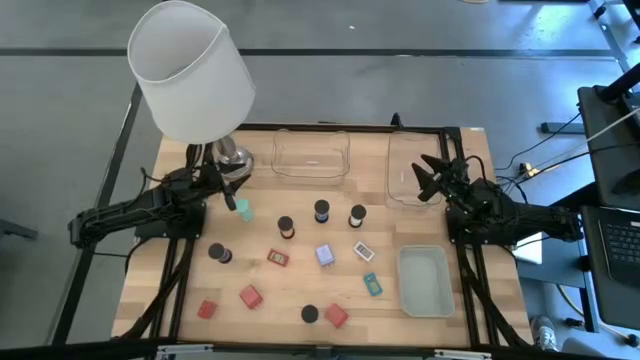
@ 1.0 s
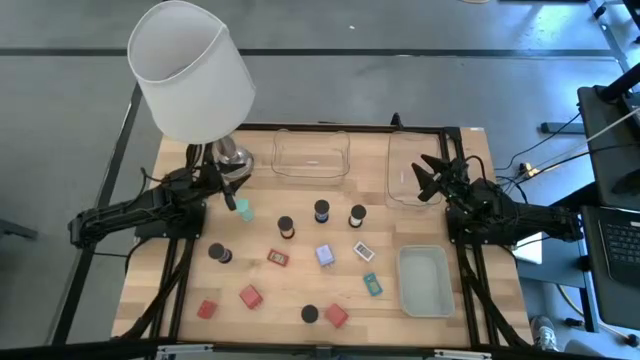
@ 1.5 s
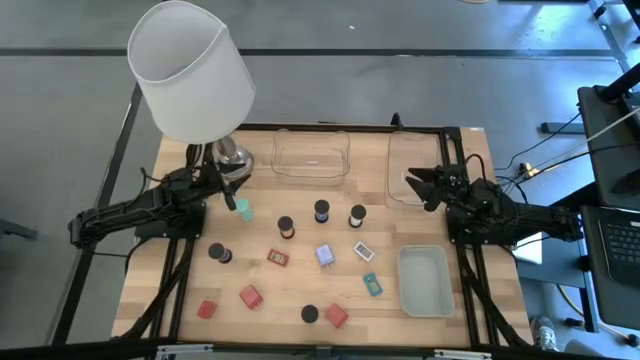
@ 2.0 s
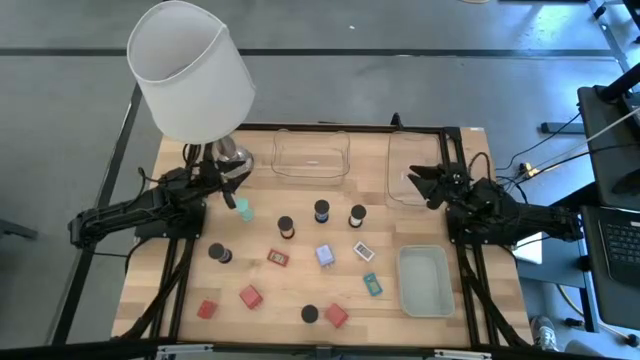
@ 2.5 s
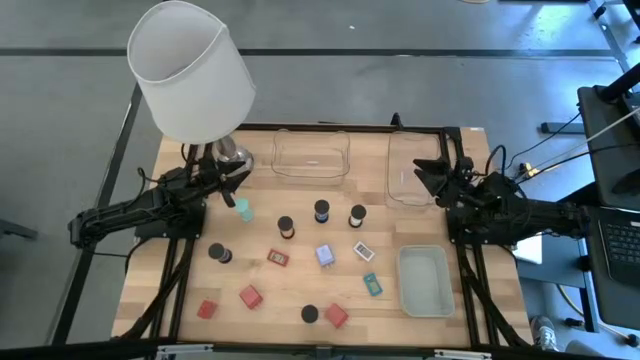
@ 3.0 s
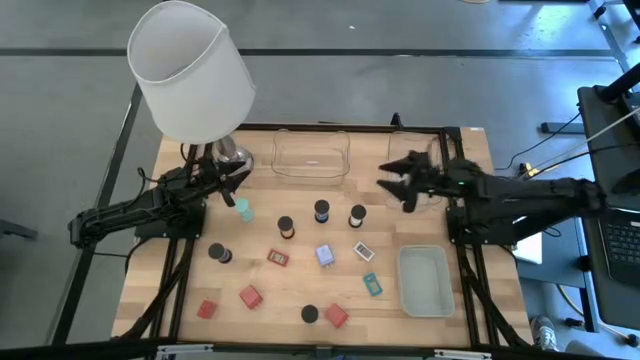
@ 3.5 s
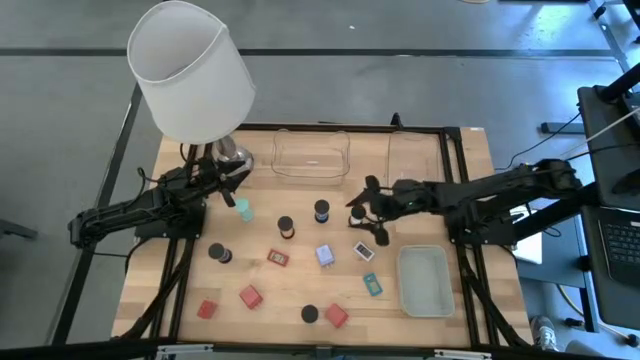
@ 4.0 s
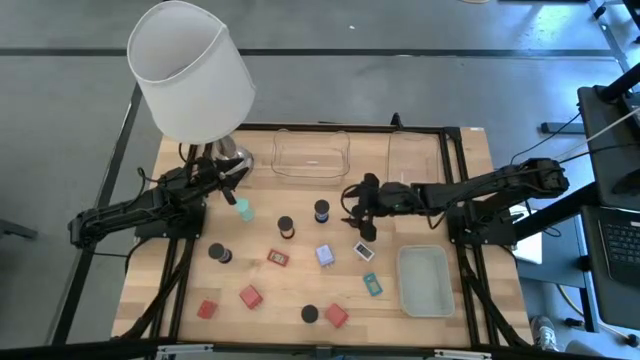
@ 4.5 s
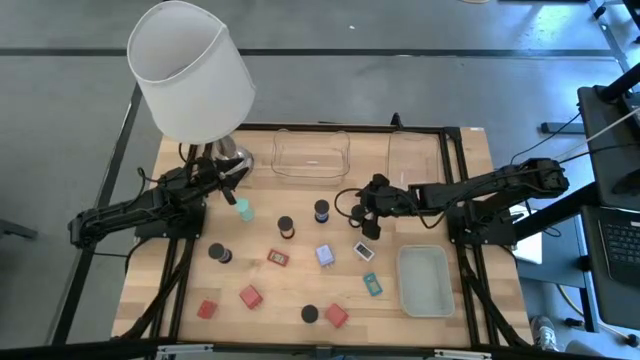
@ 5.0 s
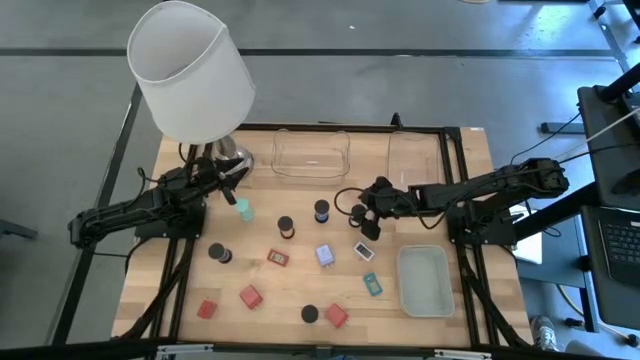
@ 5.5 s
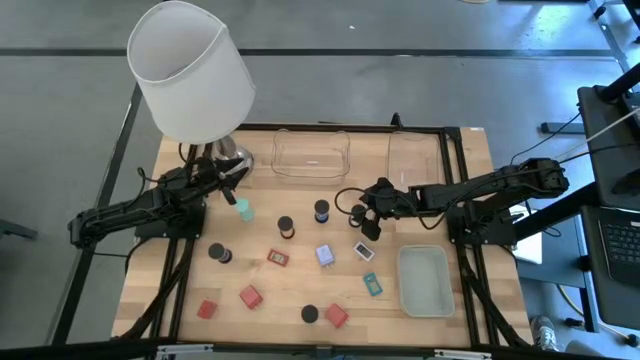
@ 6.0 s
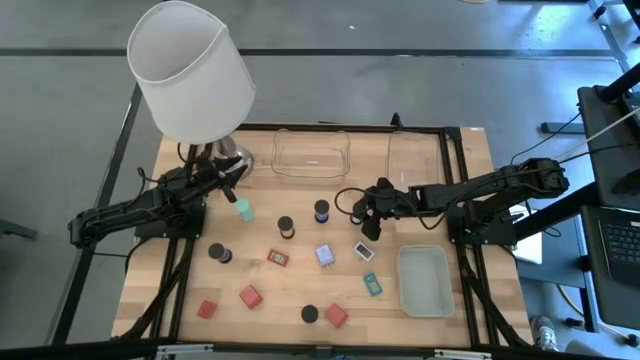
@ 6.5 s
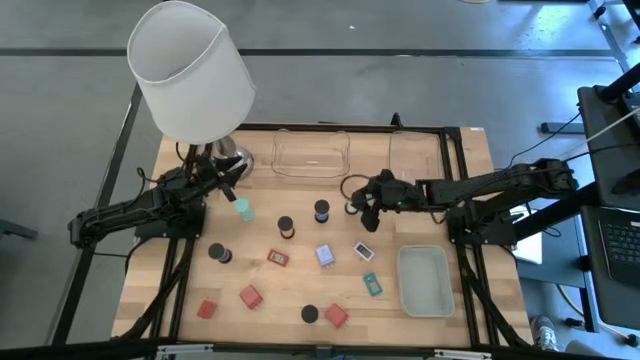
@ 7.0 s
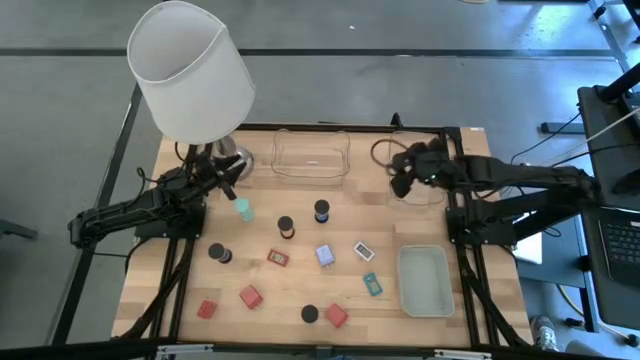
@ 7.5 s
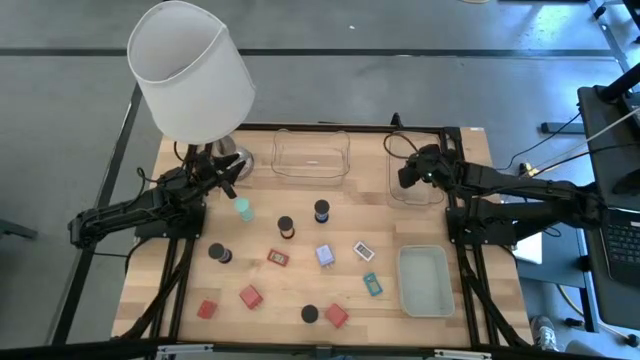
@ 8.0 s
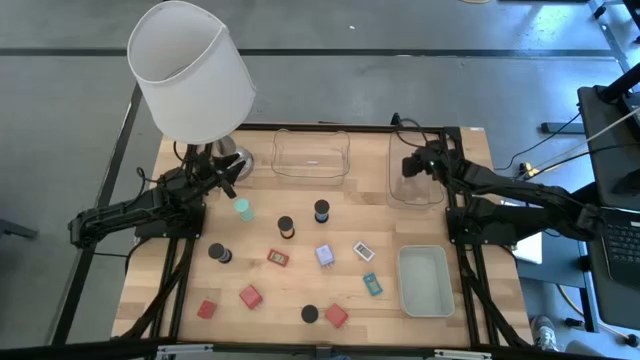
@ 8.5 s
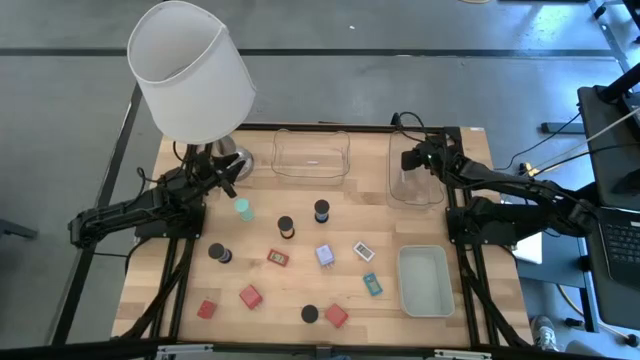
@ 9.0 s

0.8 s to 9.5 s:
Task: Pick & Place Office items
Put the white hourglass into the right transparent bin

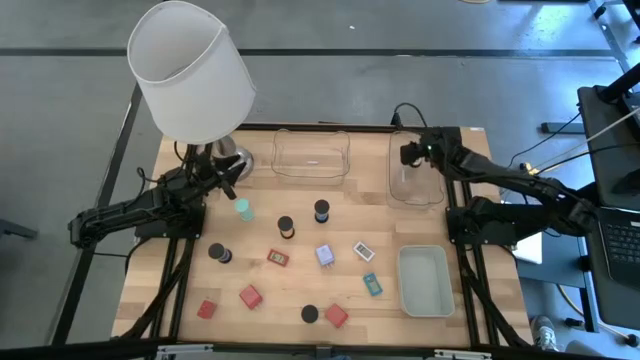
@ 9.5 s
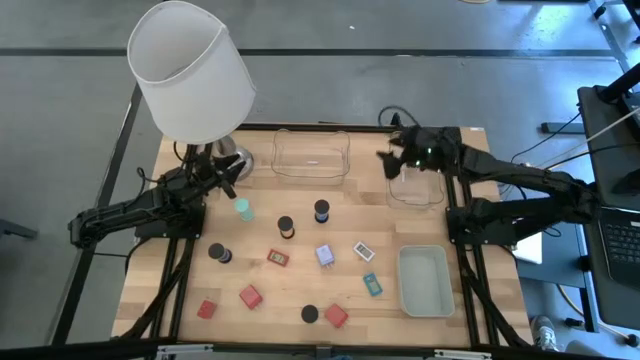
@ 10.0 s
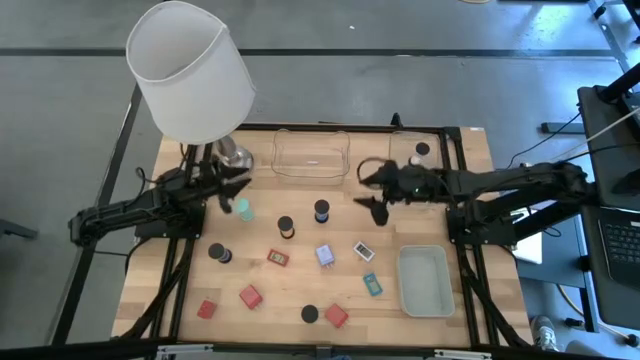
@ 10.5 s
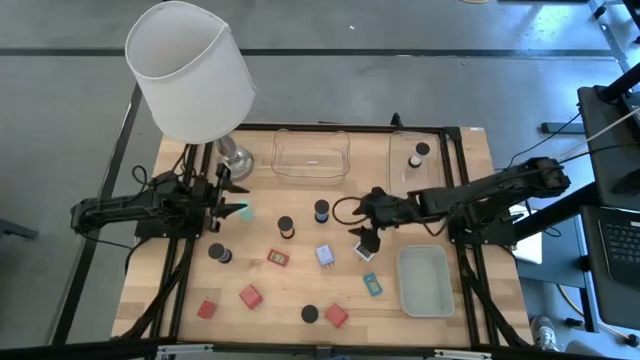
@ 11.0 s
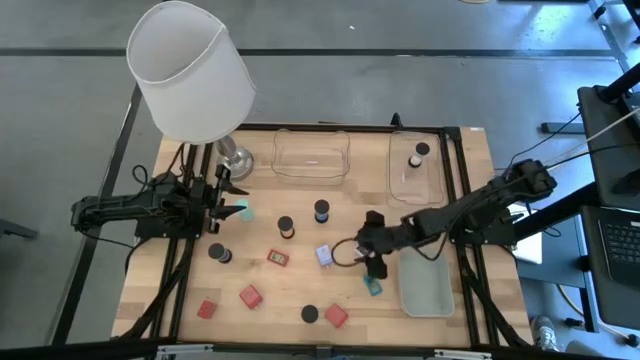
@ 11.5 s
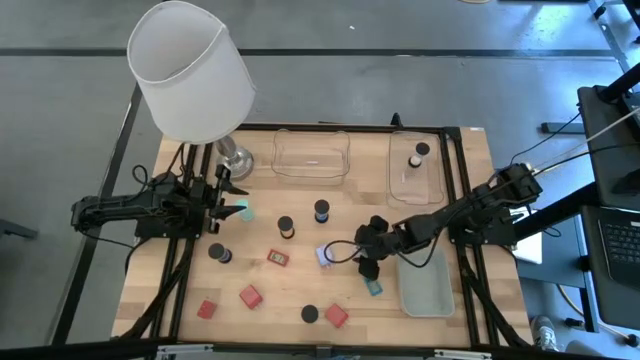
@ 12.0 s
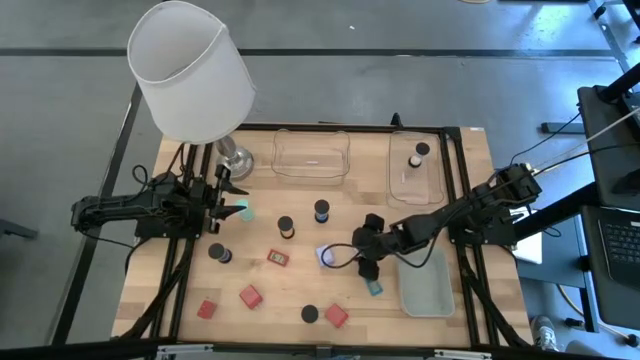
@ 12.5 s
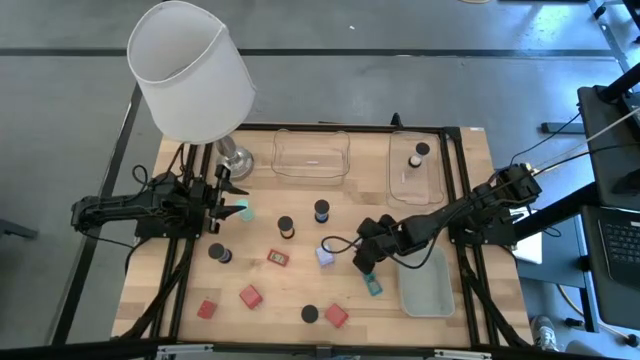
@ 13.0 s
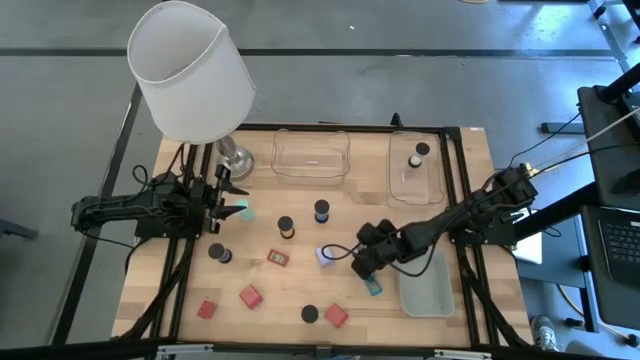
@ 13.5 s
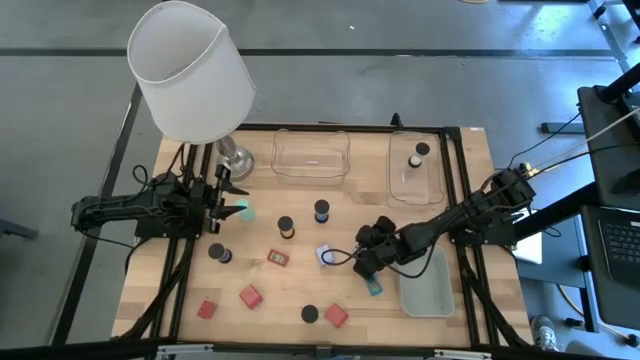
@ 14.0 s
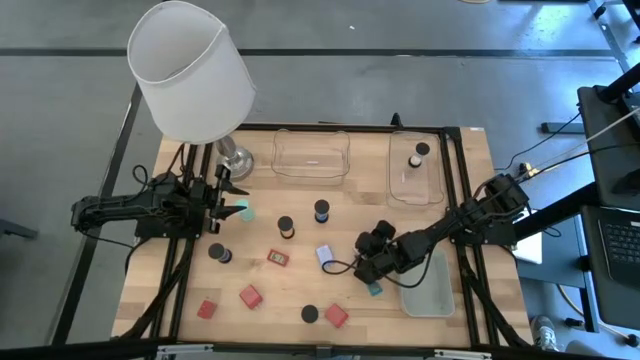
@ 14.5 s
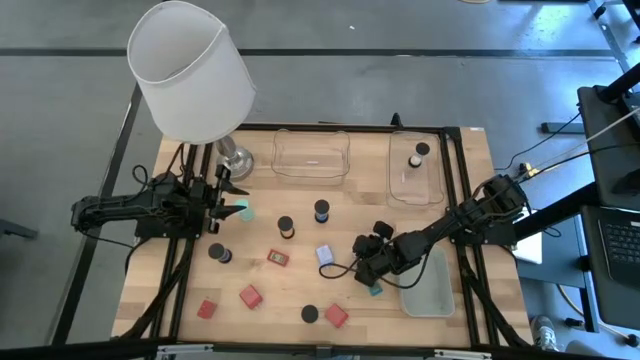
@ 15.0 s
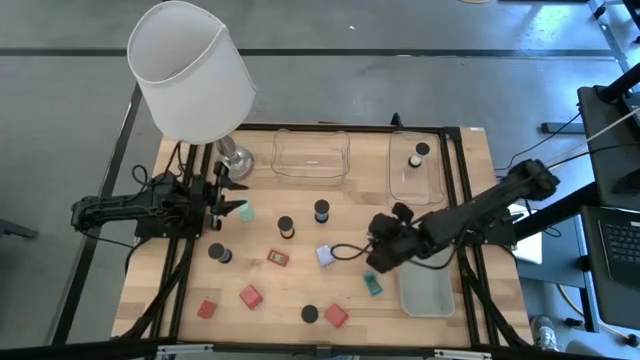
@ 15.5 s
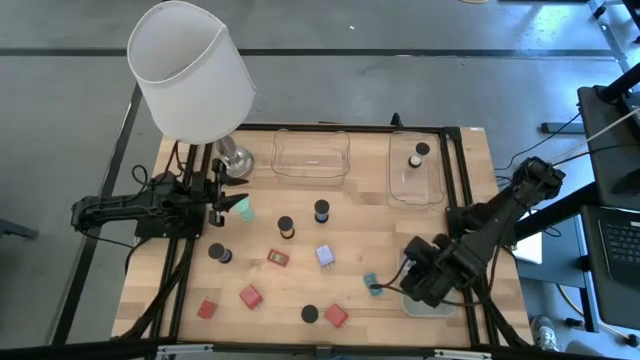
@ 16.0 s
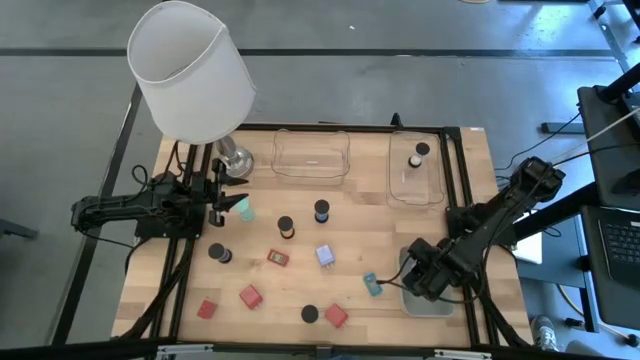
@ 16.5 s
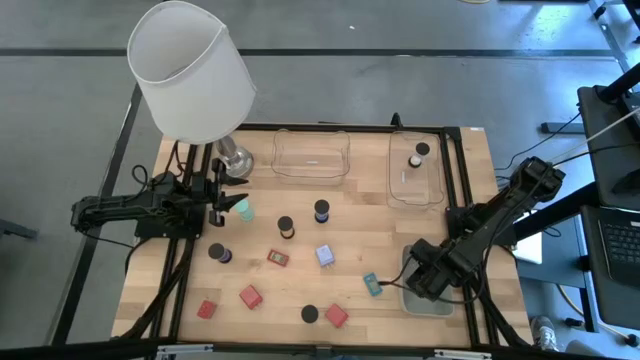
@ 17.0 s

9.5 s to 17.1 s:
Put the white digital clock into the gray bin

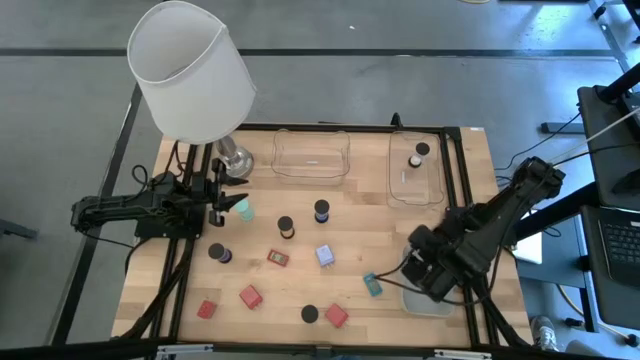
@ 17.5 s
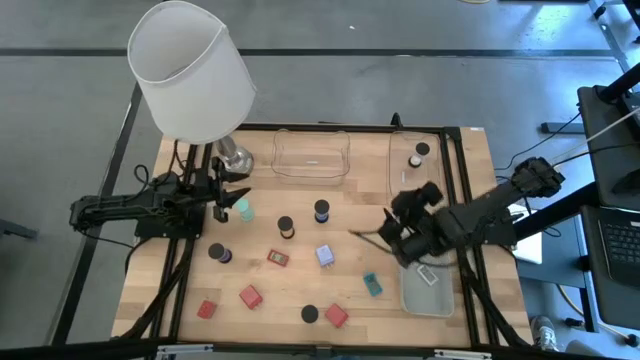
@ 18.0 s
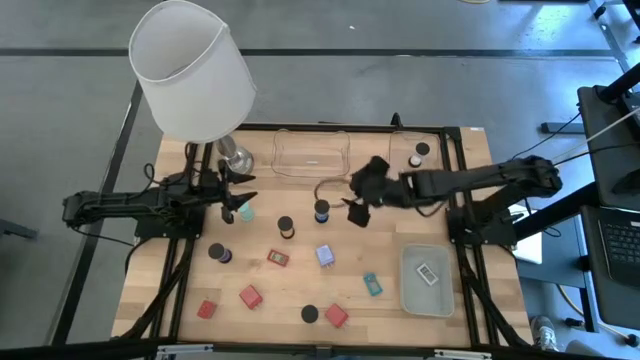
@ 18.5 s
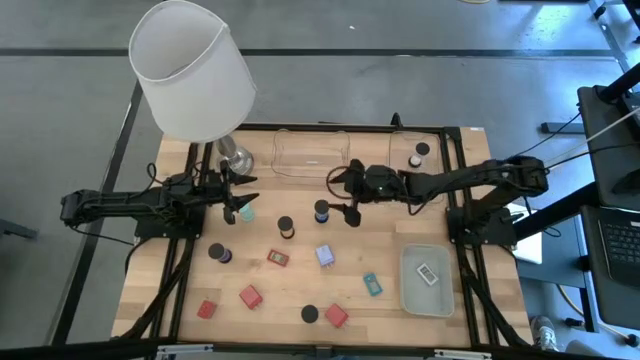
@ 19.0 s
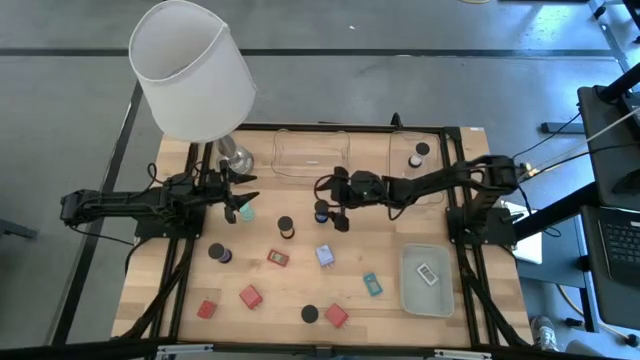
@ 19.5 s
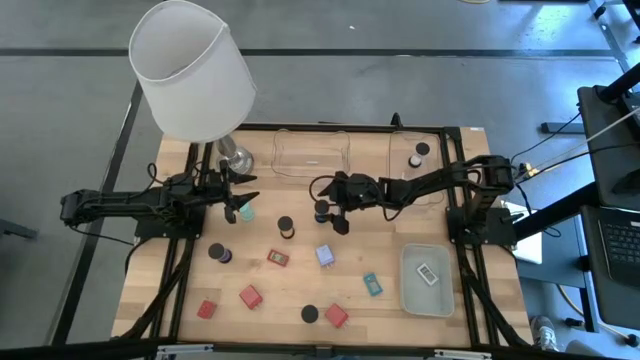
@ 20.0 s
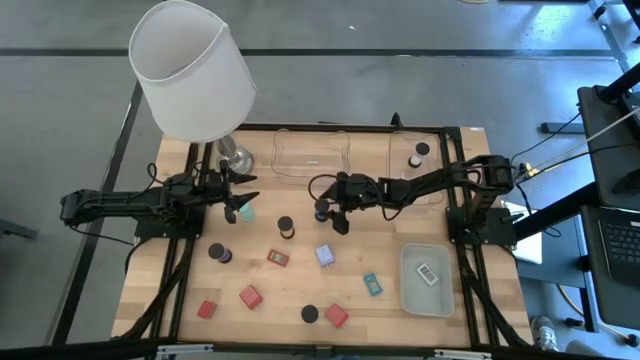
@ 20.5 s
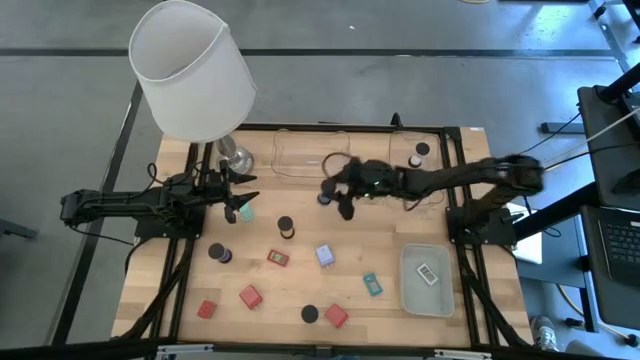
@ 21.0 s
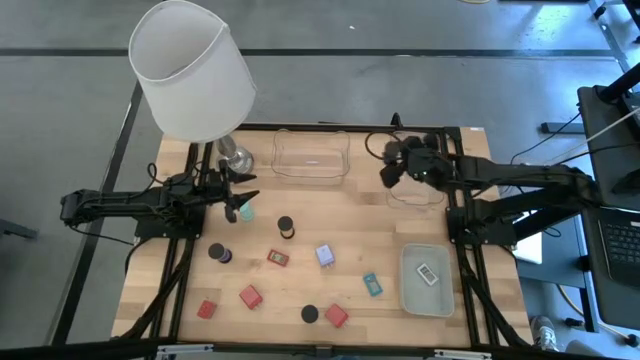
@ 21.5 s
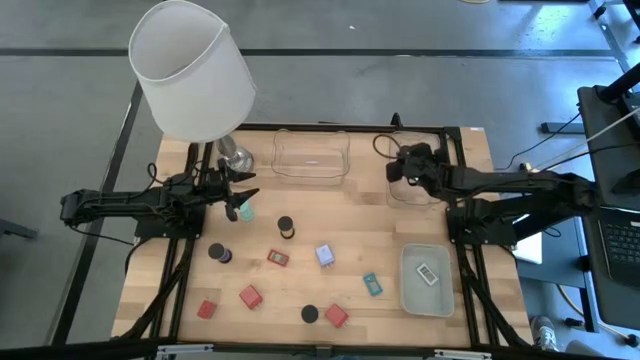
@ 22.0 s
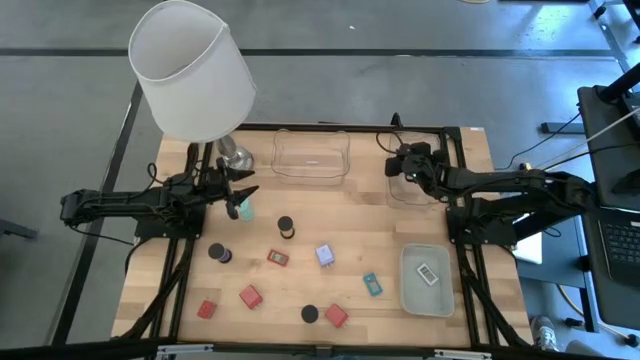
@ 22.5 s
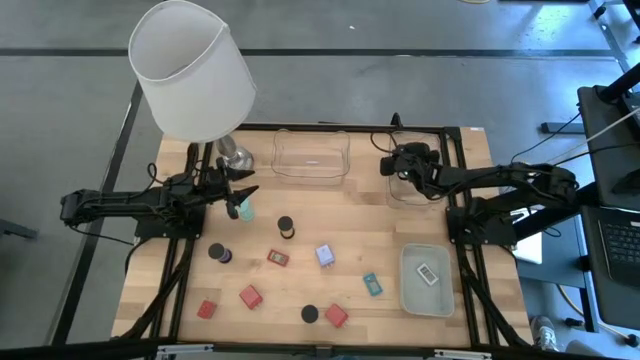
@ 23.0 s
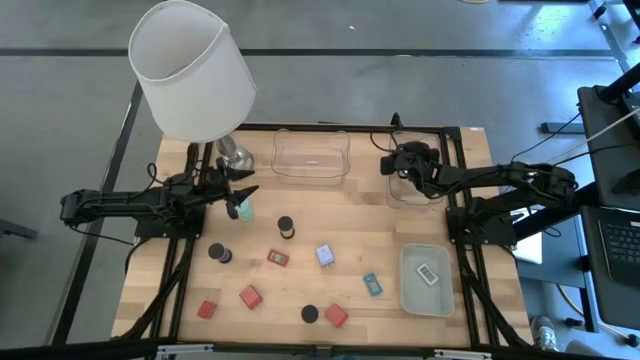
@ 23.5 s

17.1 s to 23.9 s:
Put the blue hourglass into the right transparent bin
